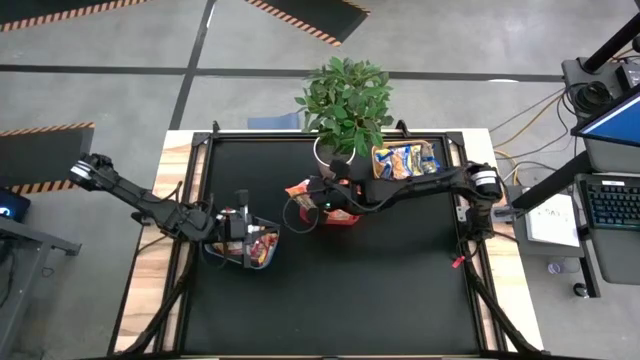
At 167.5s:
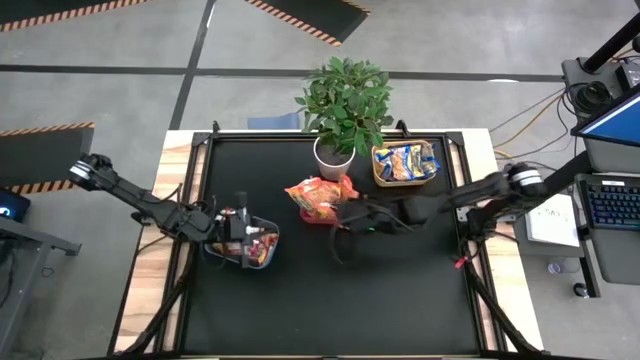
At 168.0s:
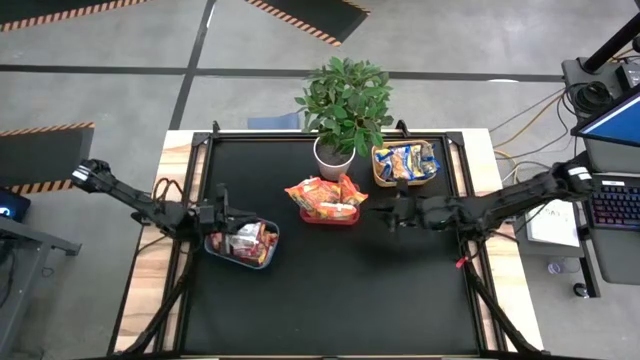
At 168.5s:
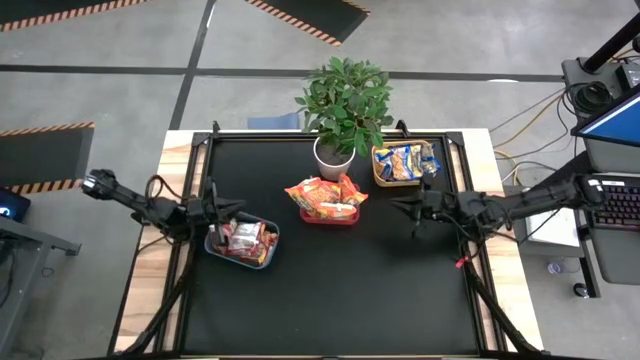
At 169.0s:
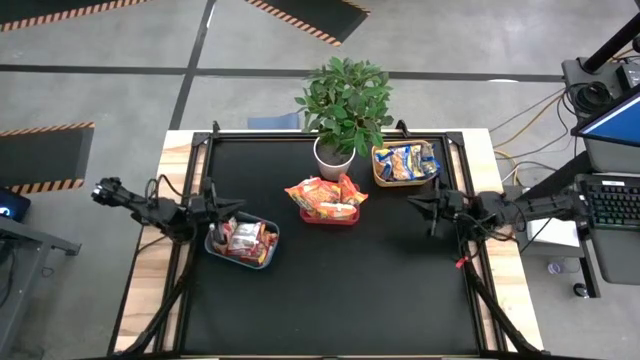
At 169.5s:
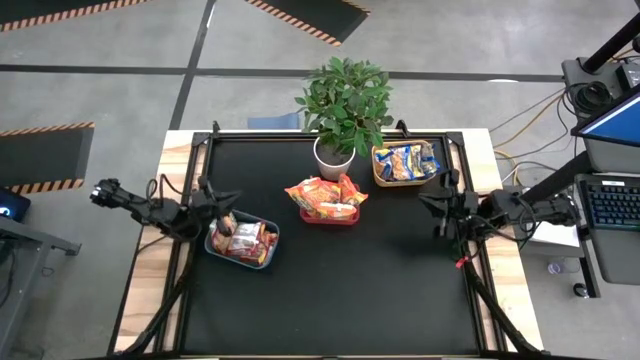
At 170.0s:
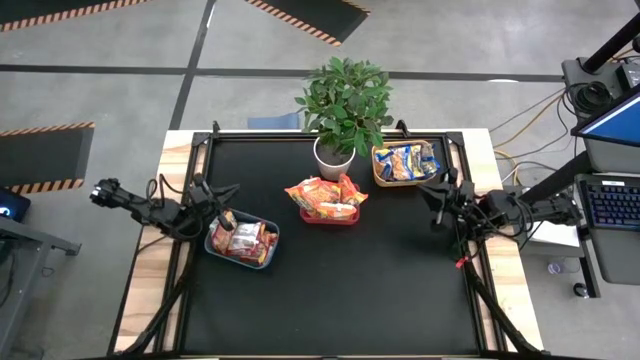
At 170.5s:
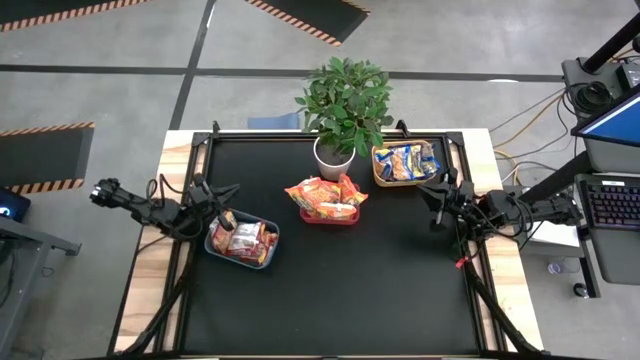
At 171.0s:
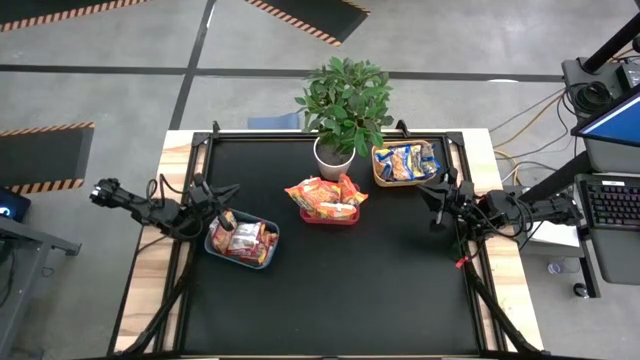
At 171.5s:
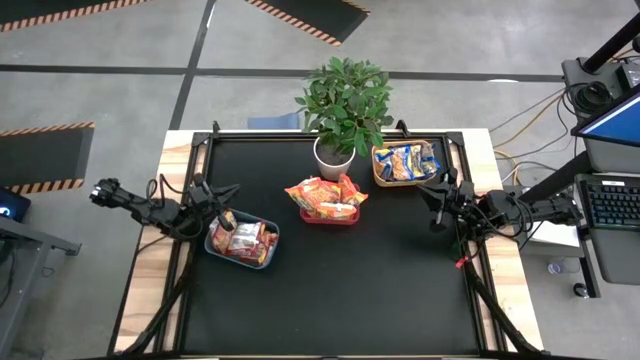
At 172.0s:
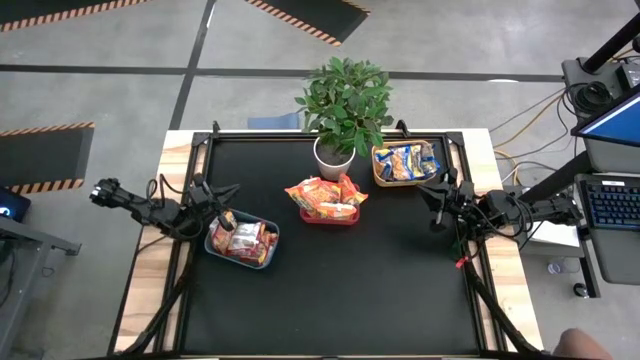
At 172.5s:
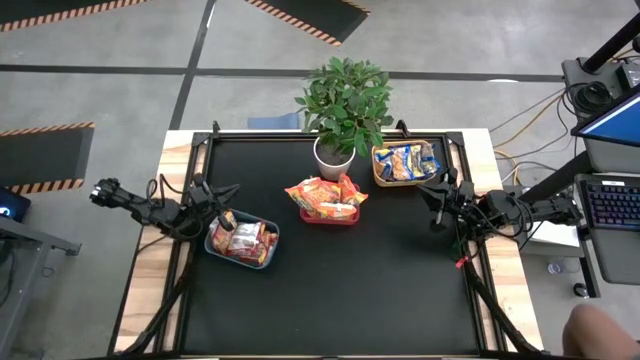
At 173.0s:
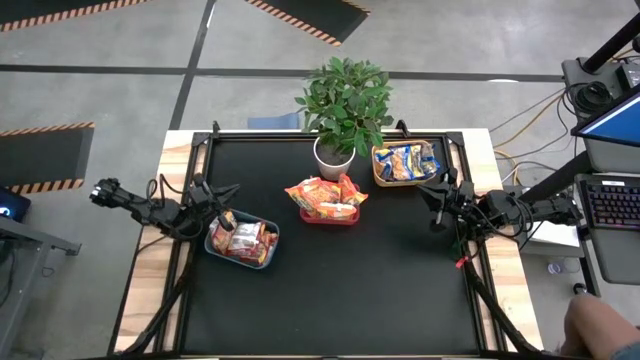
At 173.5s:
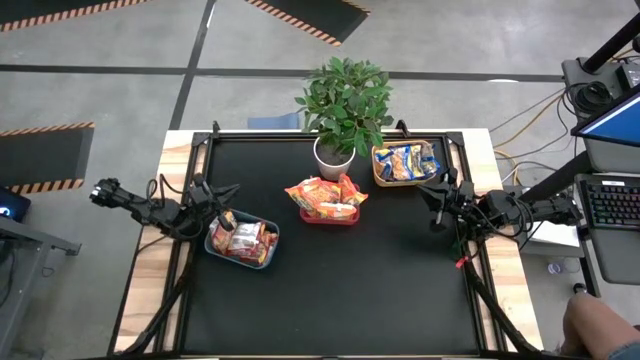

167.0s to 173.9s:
Task: Sort Maruchan noodles
Return to Home Position

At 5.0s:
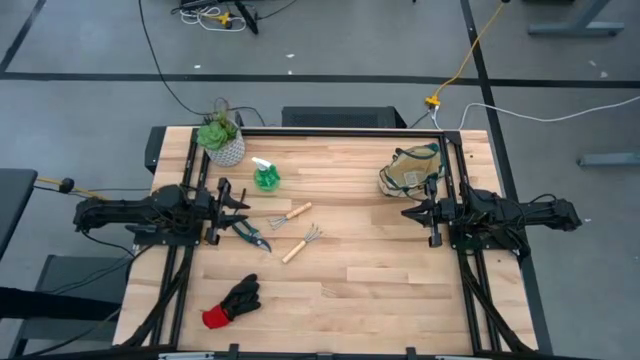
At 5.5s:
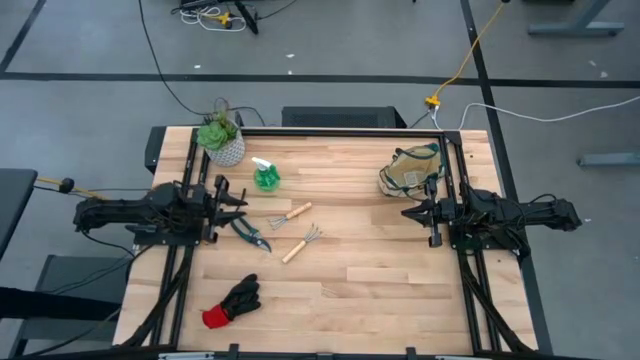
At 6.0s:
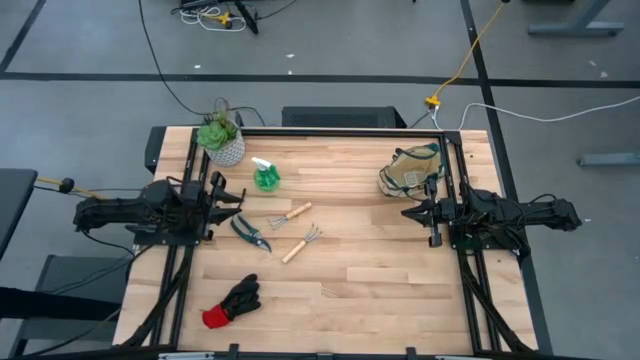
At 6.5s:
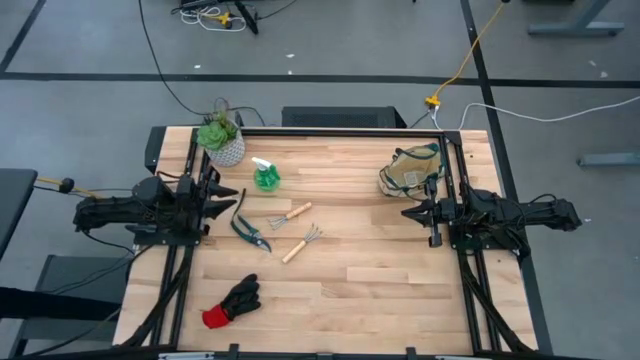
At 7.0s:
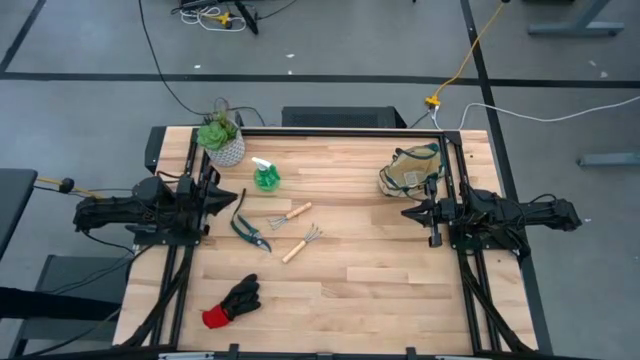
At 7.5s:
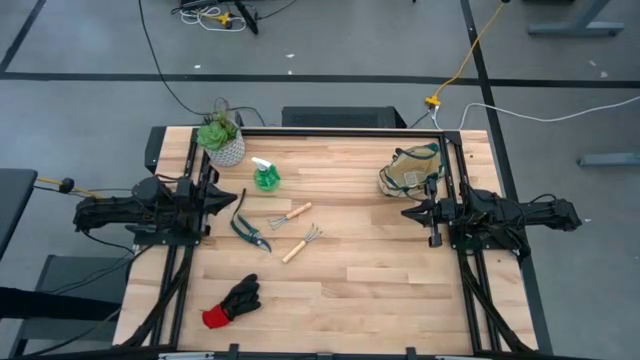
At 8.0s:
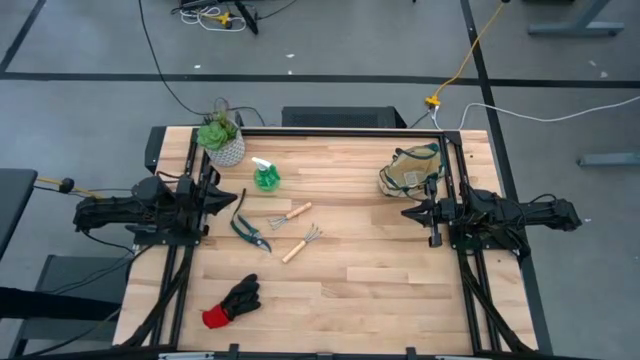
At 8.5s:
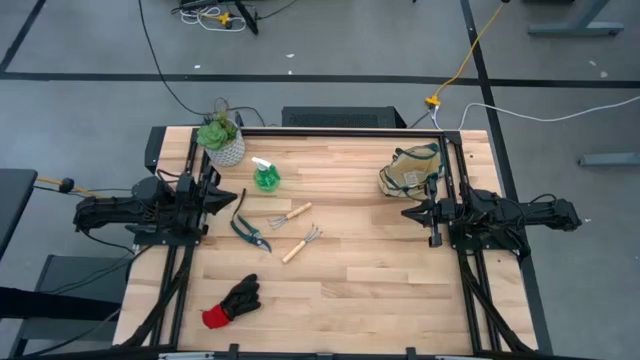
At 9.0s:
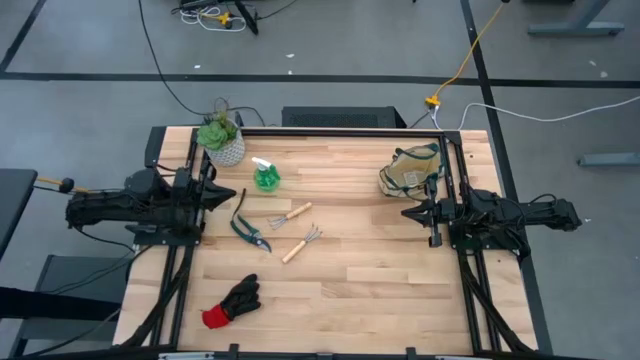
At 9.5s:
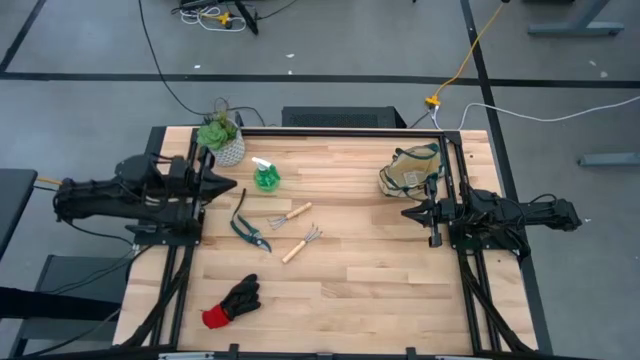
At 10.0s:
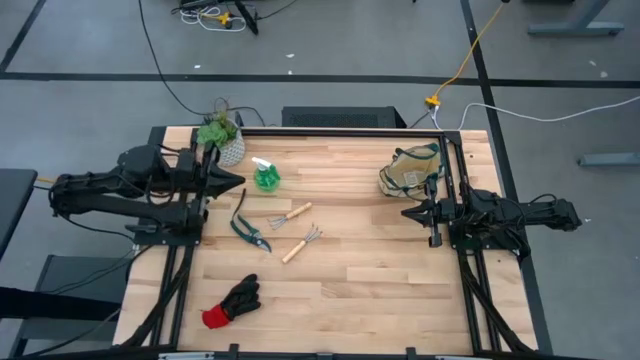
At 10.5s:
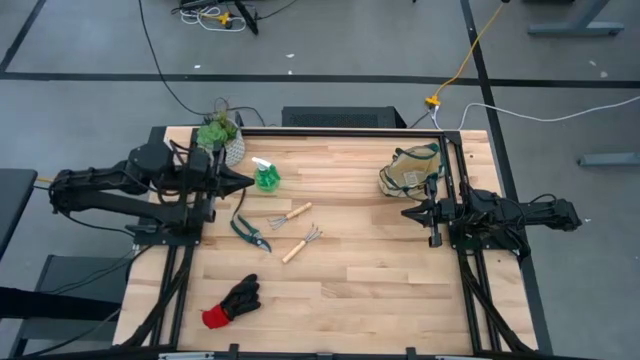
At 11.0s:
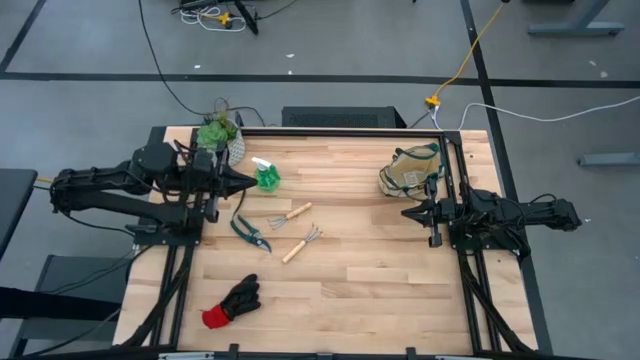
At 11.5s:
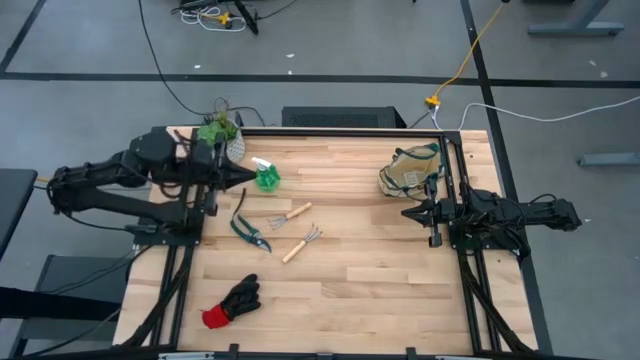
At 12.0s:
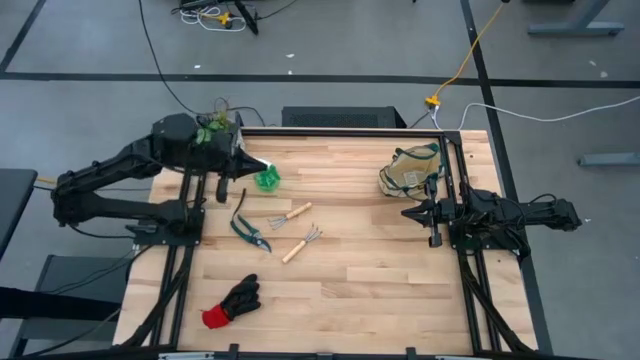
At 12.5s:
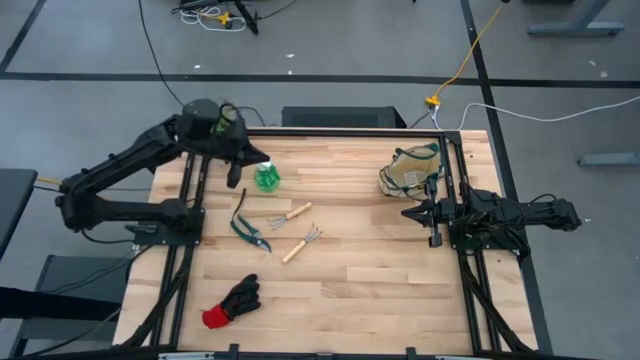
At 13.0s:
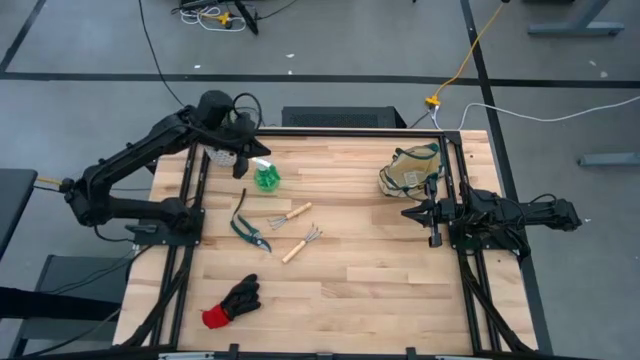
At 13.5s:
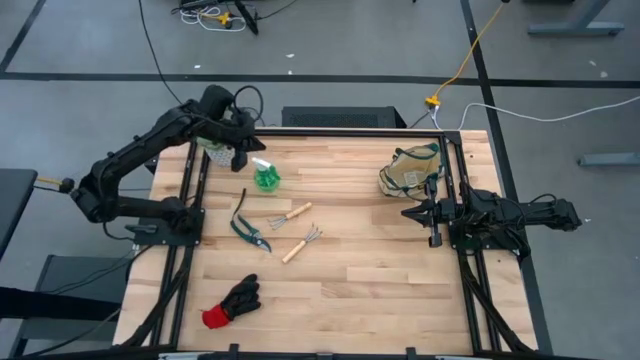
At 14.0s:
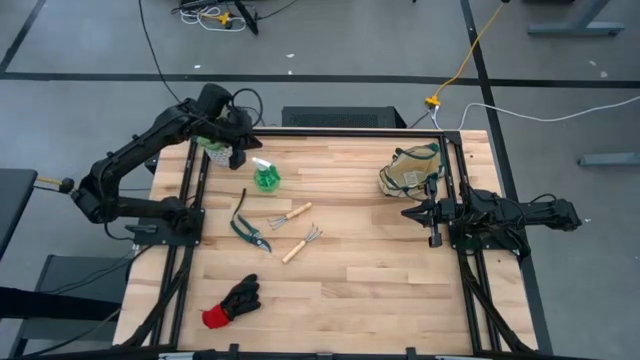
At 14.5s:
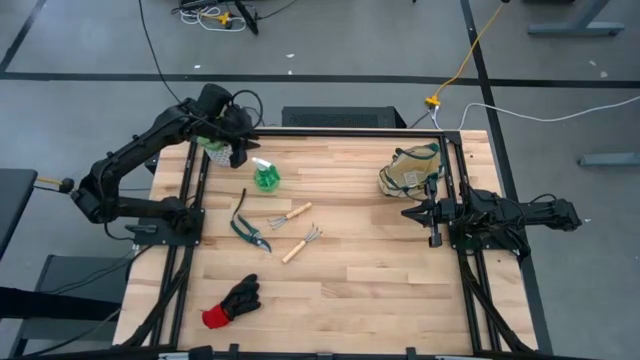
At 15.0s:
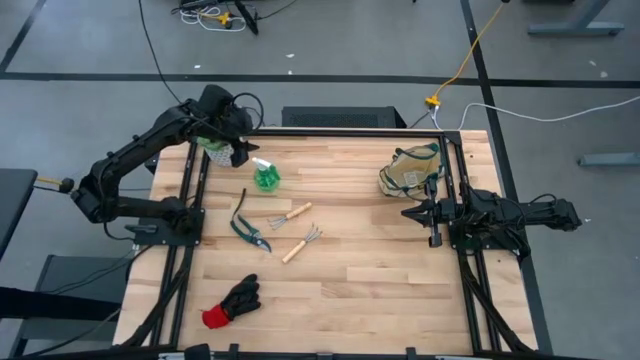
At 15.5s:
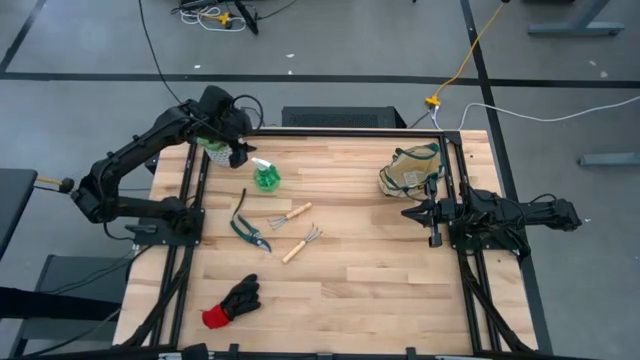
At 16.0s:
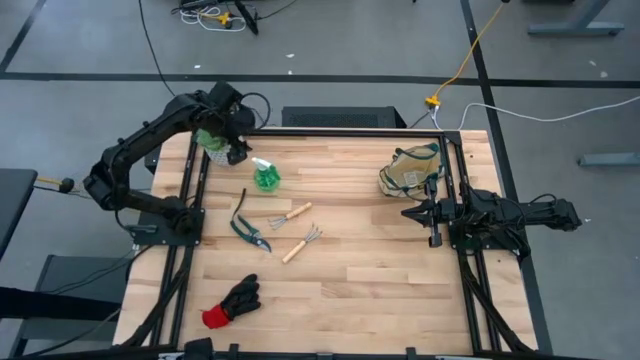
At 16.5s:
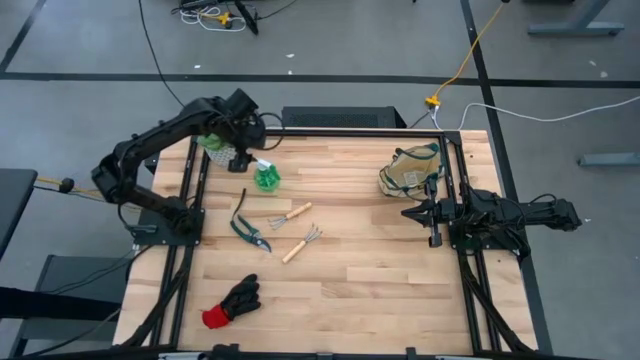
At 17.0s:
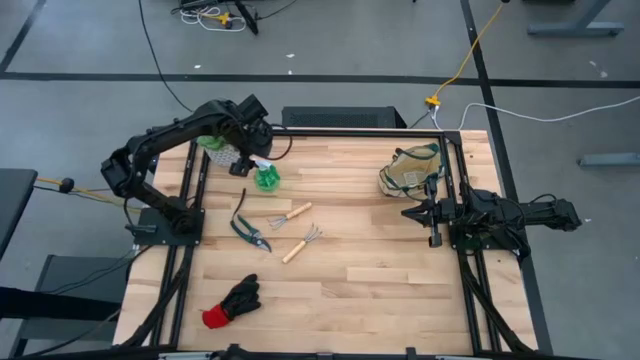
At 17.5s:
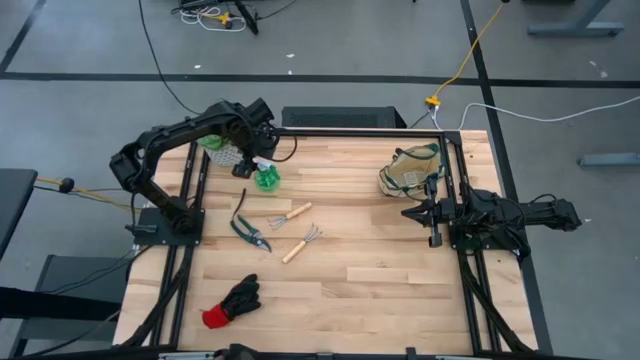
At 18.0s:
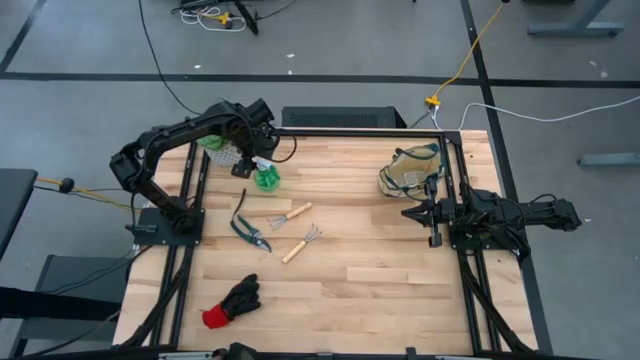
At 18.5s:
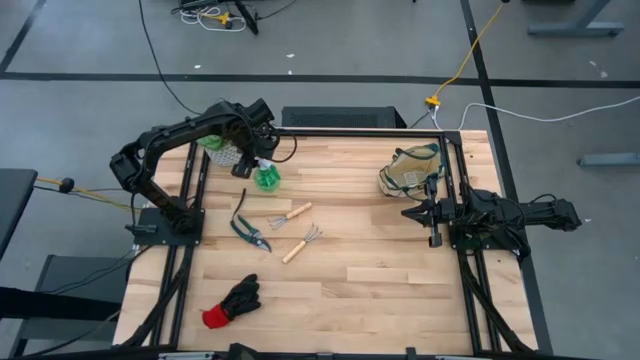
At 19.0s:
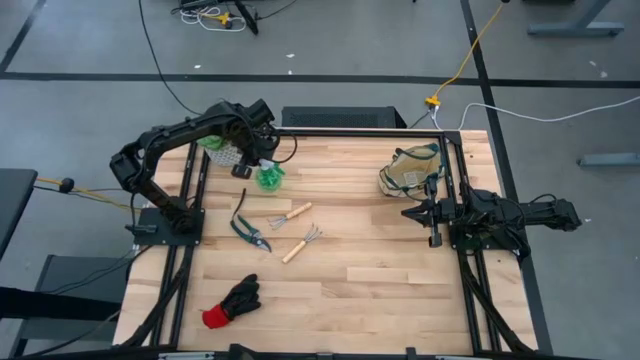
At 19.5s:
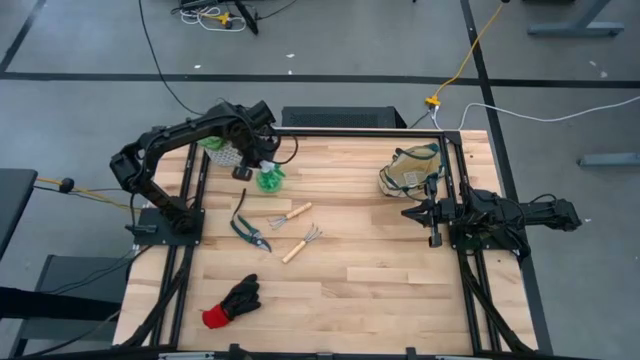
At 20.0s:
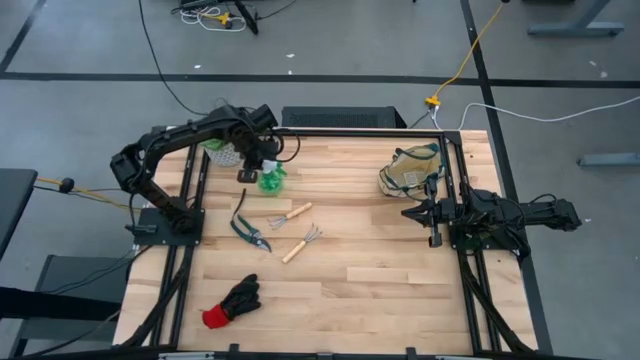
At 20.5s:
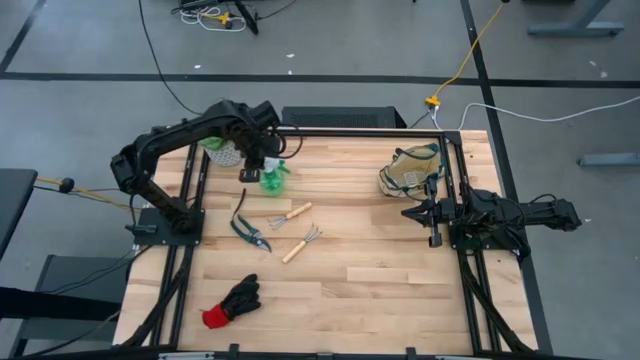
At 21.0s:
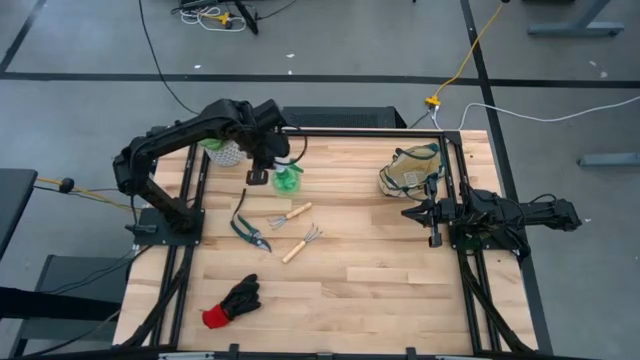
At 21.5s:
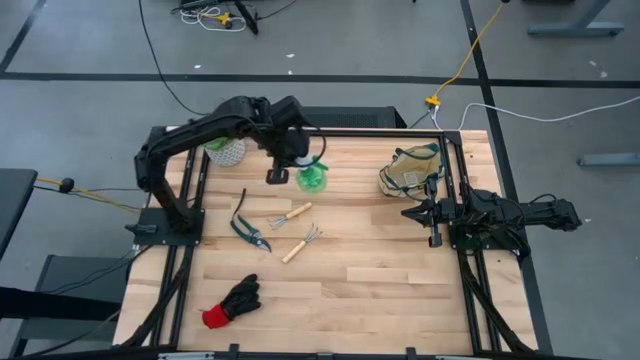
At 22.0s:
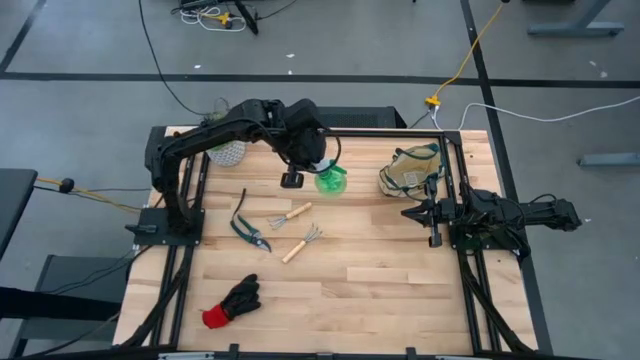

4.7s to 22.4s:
Task: Pick & Place Garden tools in Gardening bag
Put the green spray bottle into the brown gardening bag
